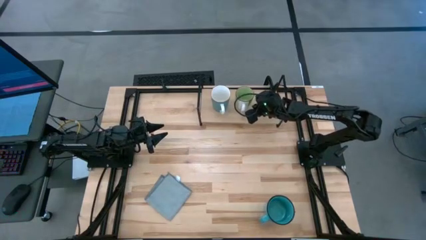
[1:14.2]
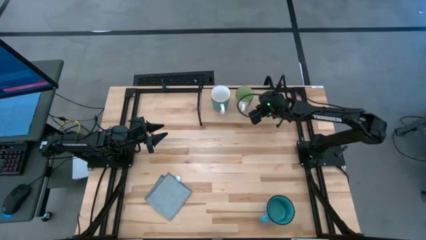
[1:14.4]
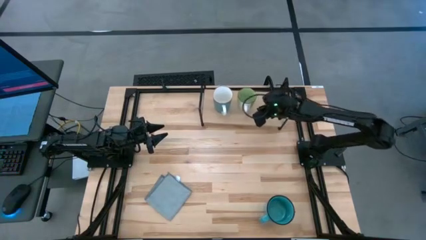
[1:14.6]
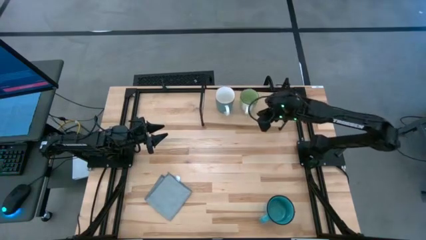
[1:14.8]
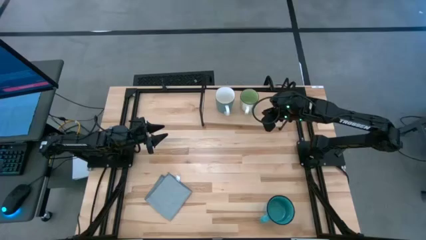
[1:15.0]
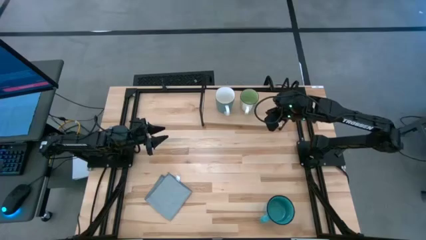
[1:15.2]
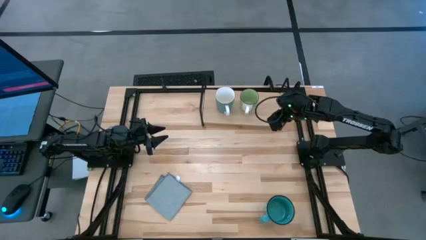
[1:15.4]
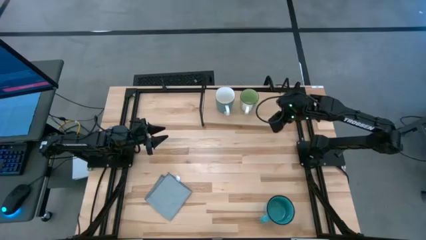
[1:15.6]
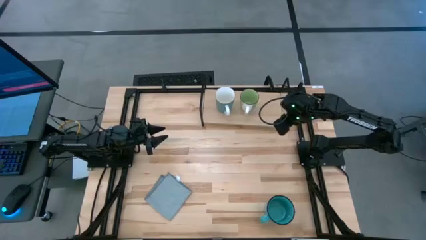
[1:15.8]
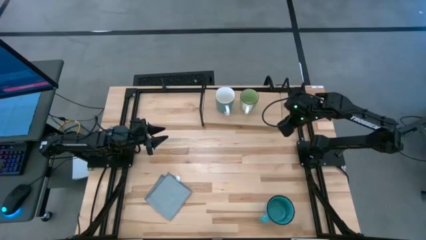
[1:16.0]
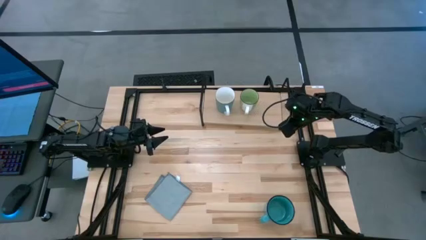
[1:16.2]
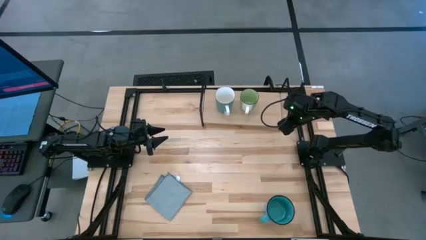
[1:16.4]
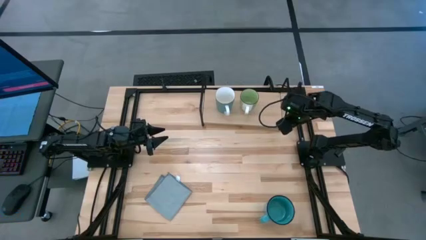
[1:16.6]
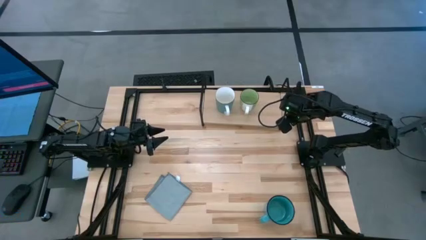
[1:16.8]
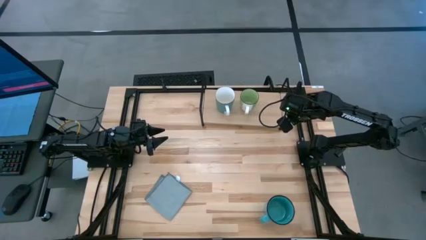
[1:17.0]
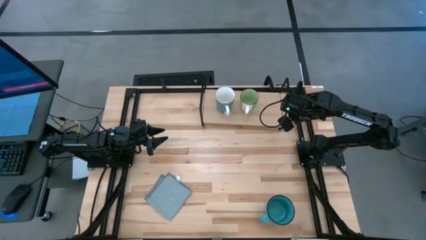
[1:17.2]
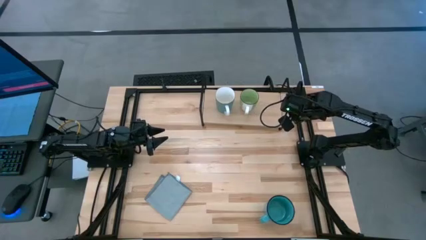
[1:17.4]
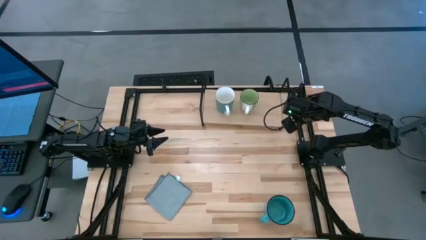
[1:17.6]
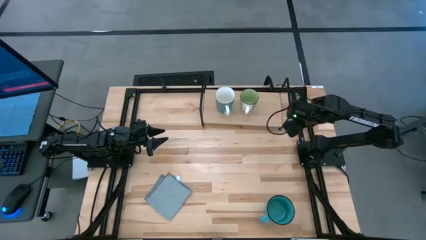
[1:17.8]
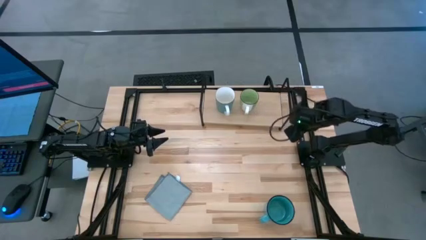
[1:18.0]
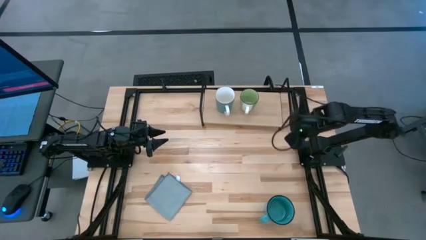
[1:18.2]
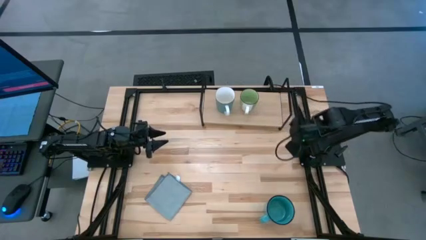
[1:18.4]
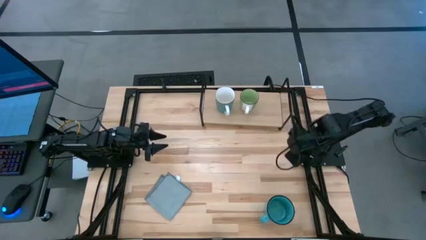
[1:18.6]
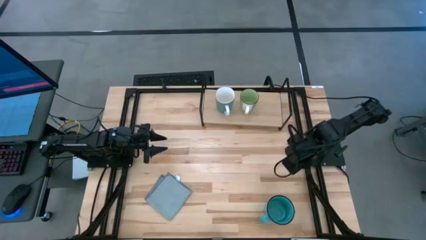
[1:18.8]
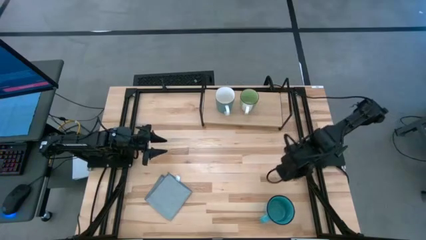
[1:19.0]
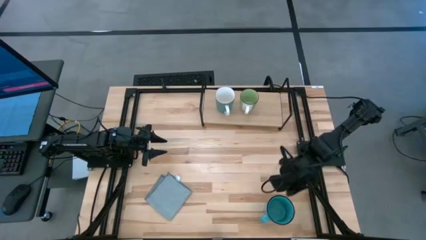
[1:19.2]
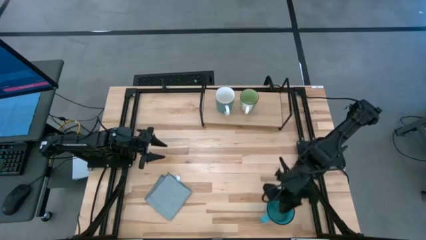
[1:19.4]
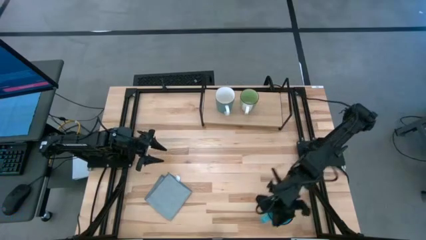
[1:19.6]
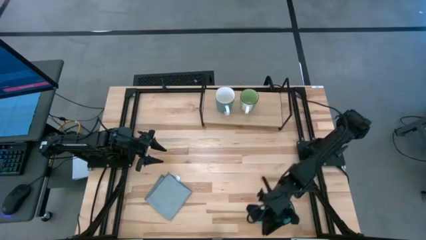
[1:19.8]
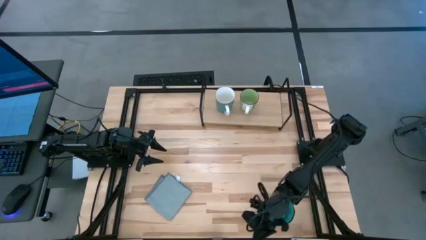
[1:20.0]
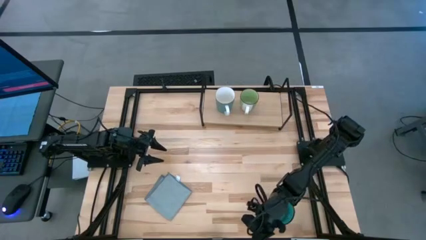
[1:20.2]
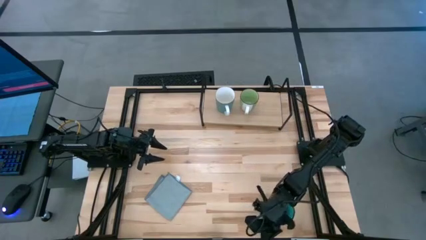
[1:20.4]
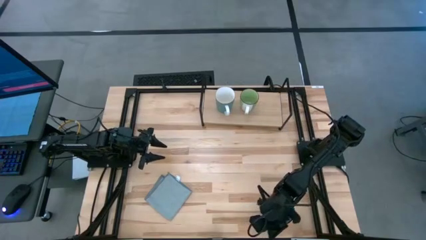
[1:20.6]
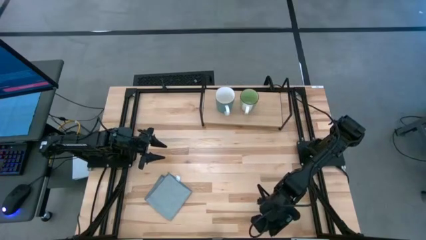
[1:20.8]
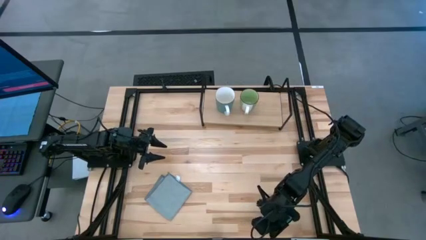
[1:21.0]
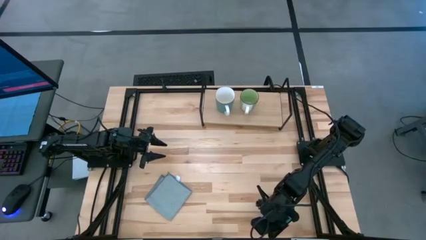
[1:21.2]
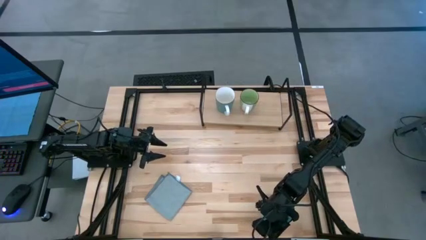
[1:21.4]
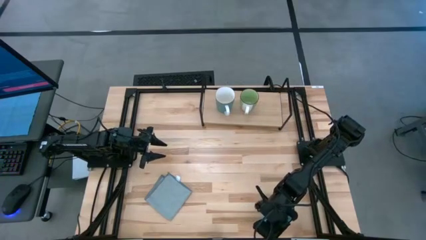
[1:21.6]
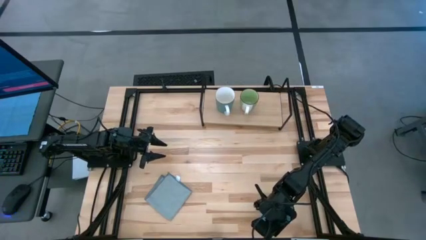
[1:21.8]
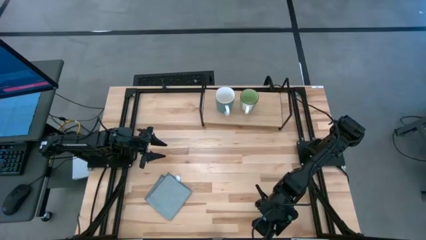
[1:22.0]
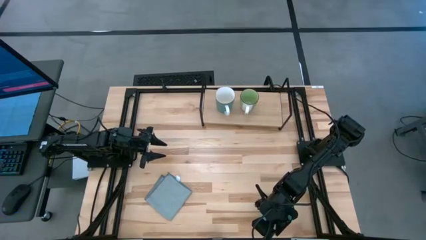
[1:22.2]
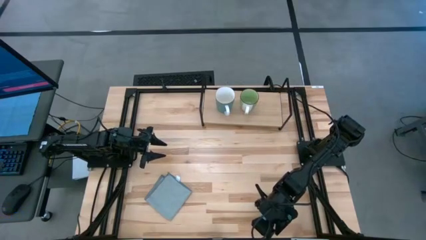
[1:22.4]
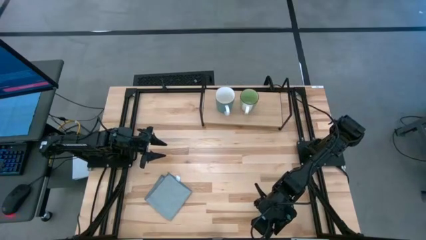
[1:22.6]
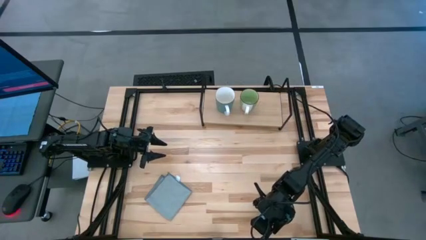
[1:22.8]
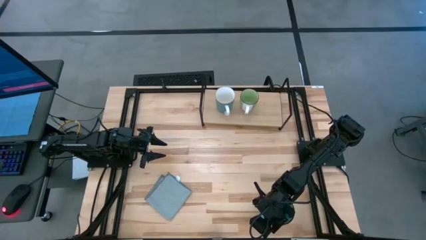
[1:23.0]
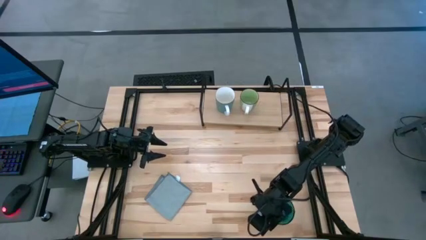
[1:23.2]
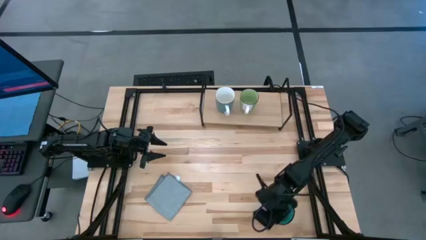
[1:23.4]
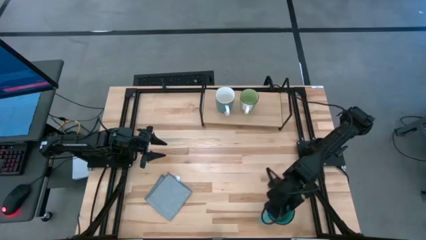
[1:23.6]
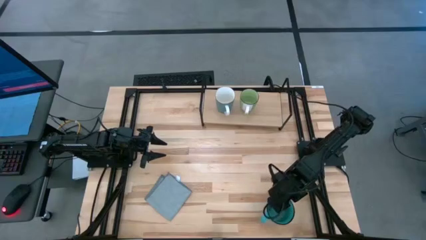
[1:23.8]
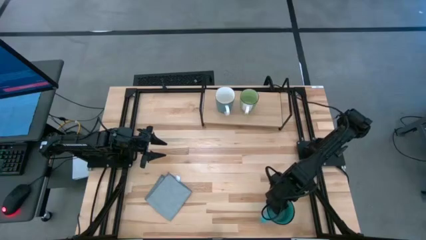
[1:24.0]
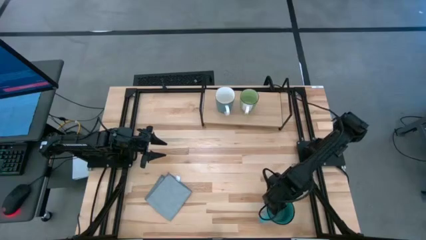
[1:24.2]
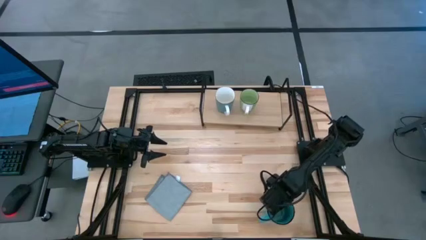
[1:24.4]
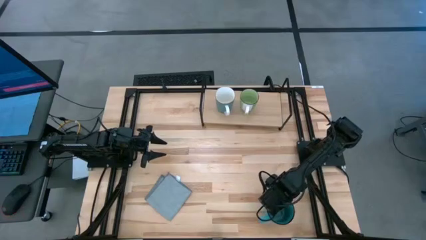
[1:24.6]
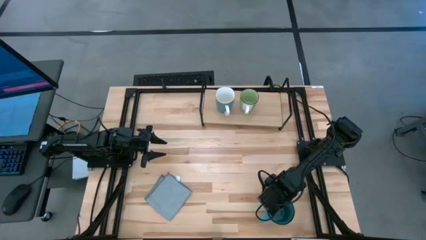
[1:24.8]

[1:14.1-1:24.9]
Task: Stack small to large cups/mugs on shelf
Put the blue mug on the shelf
